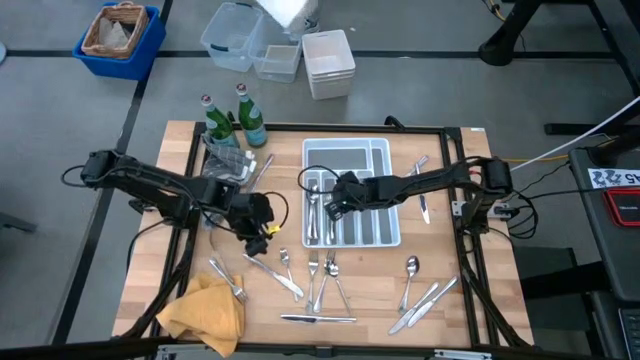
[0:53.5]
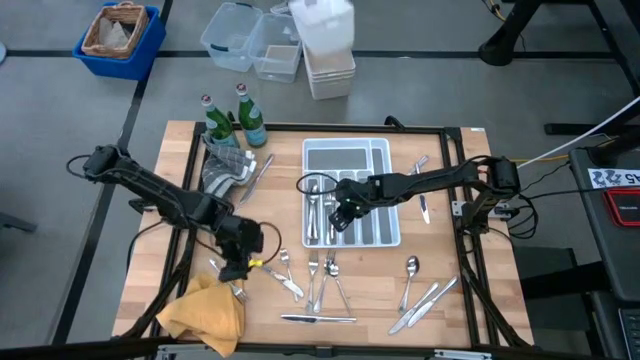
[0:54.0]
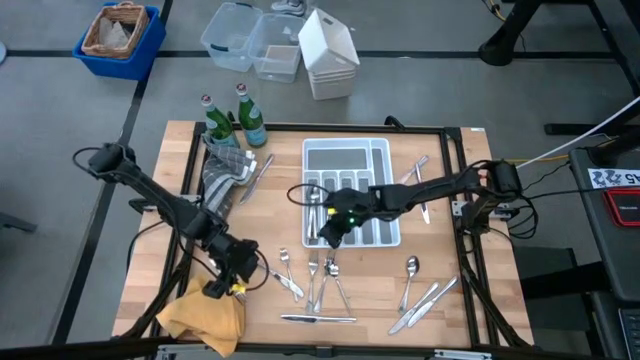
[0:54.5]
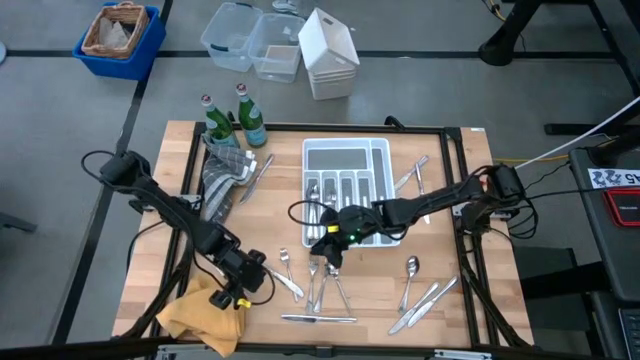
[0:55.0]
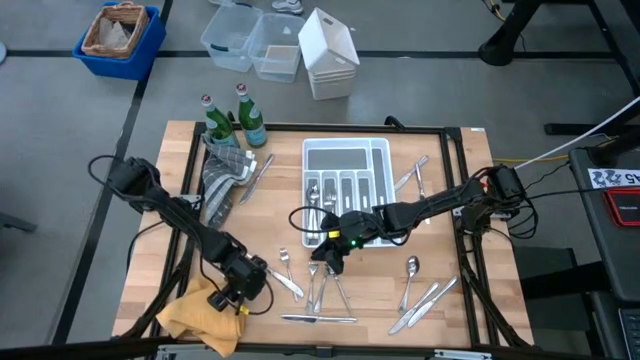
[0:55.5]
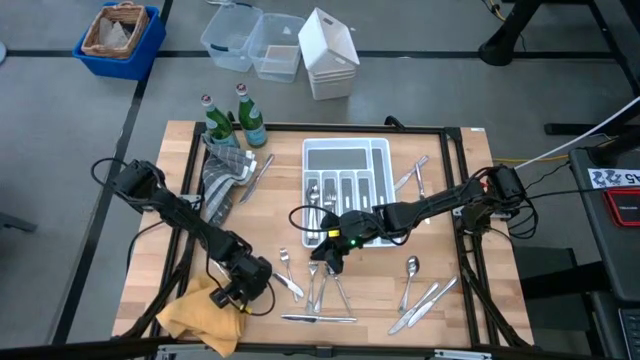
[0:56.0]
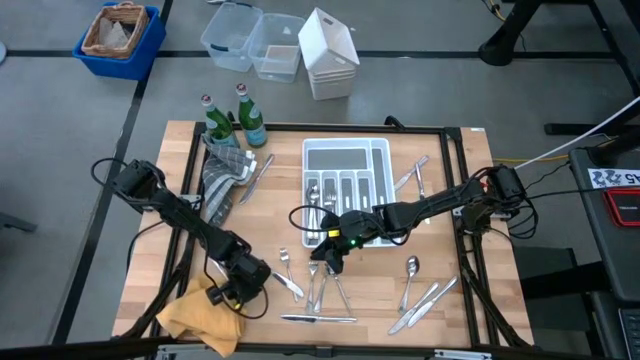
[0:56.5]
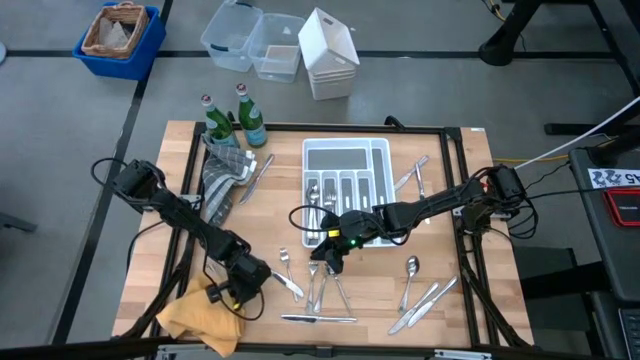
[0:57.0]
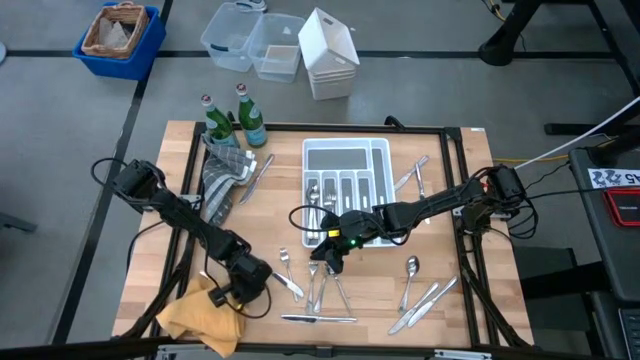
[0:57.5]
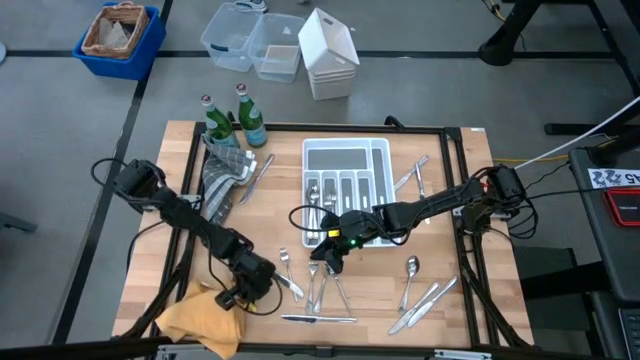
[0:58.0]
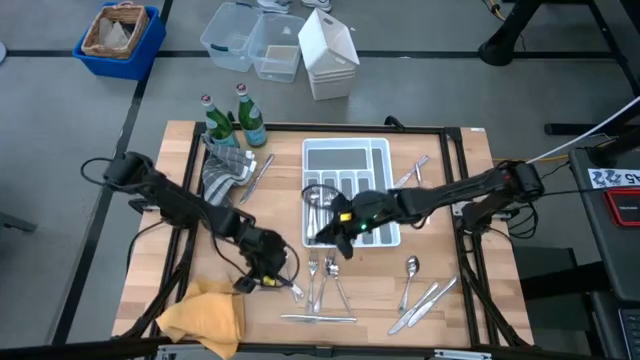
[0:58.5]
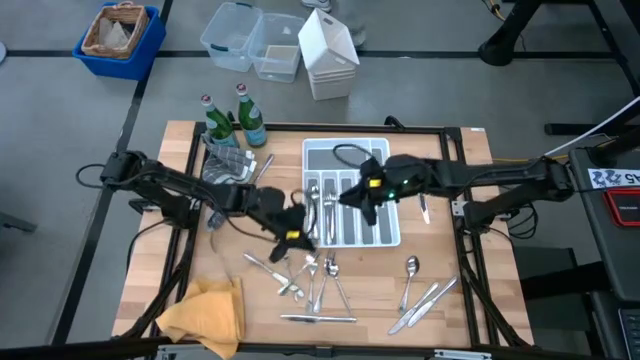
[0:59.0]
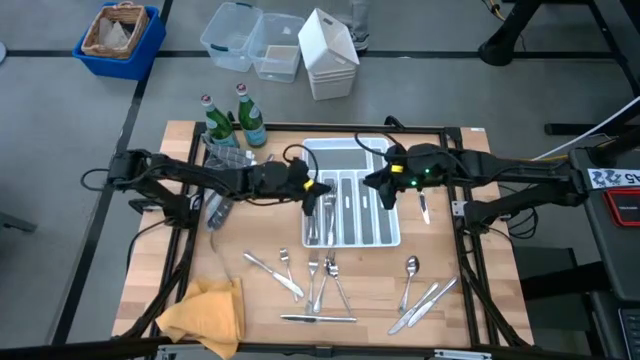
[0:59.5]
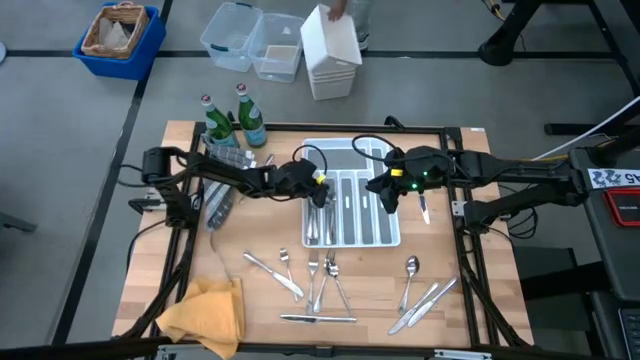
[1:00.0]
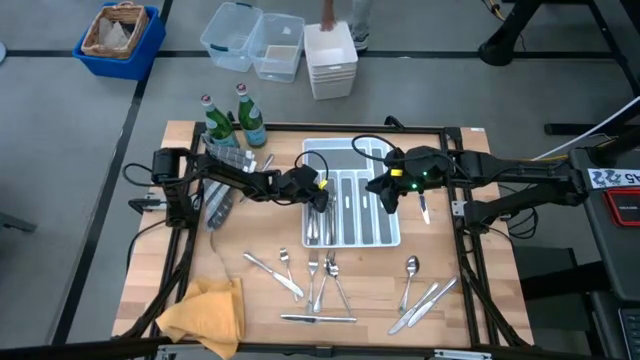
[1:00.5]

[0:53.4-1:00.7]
Task: Sort silverware
Put the silver fork into the silverware tray

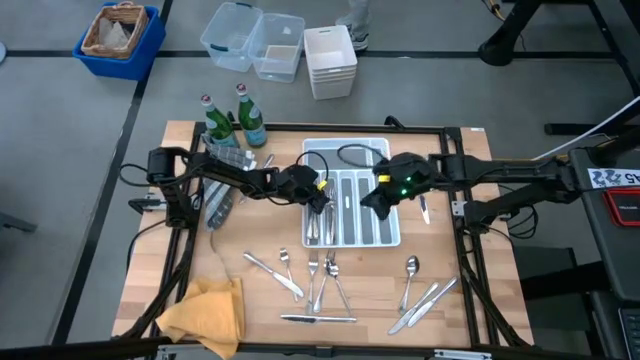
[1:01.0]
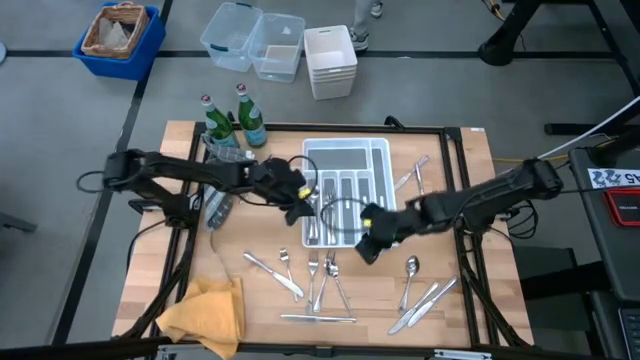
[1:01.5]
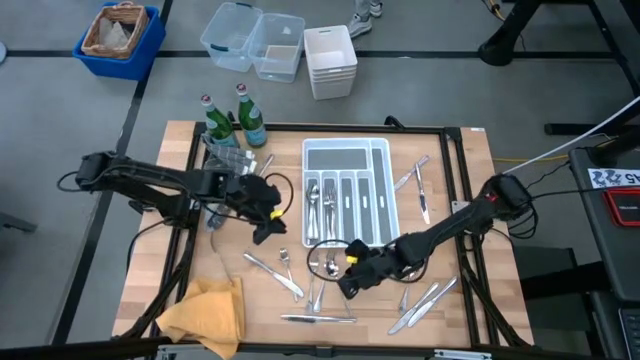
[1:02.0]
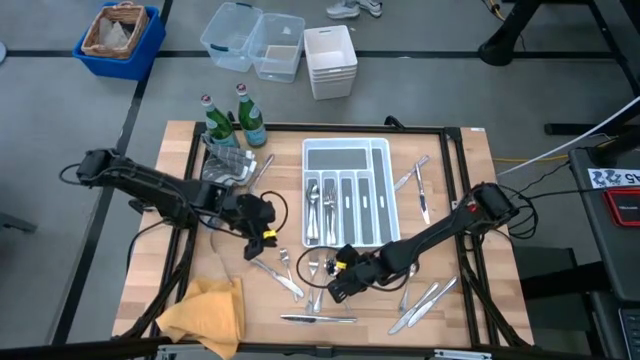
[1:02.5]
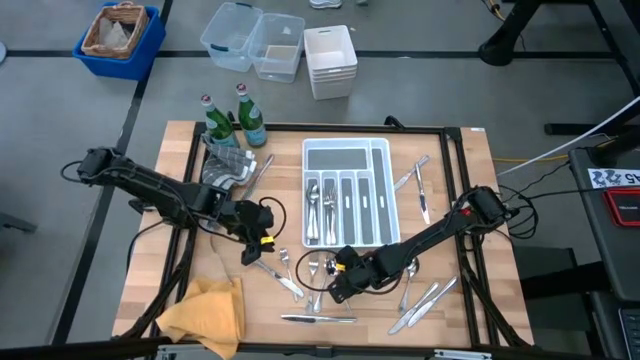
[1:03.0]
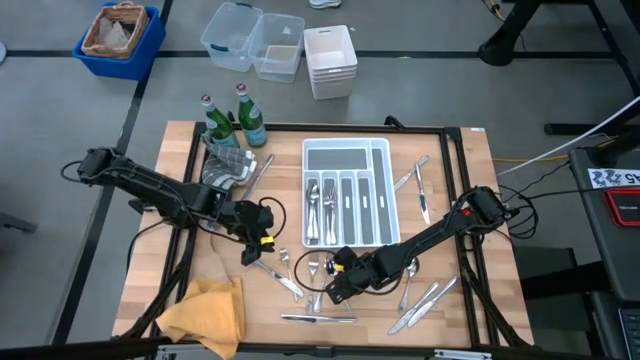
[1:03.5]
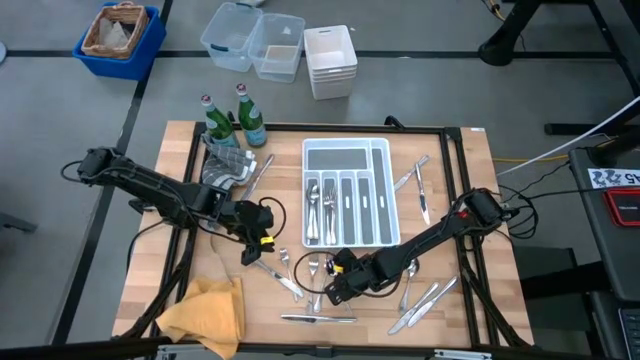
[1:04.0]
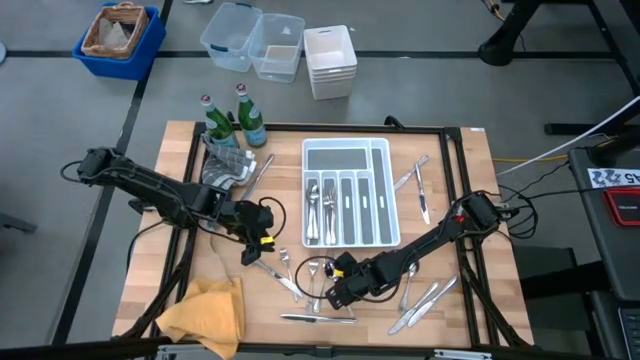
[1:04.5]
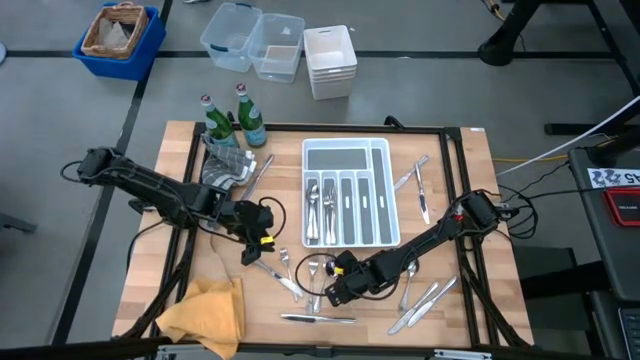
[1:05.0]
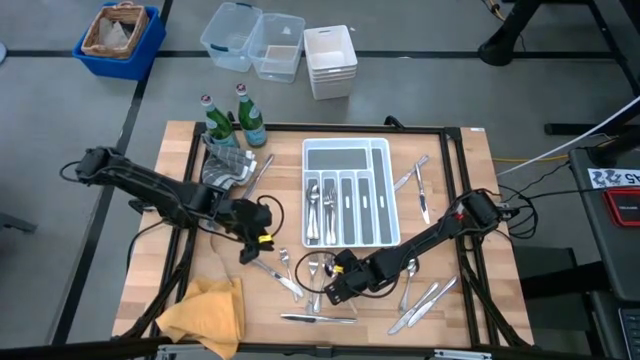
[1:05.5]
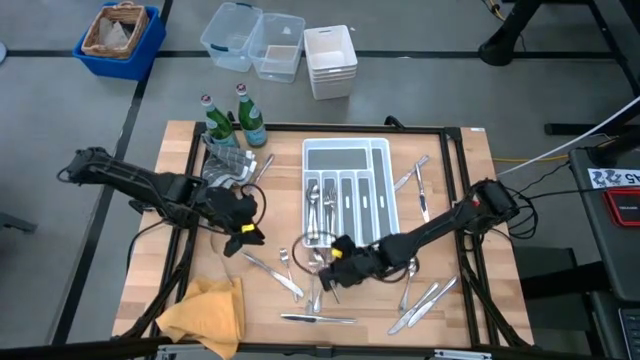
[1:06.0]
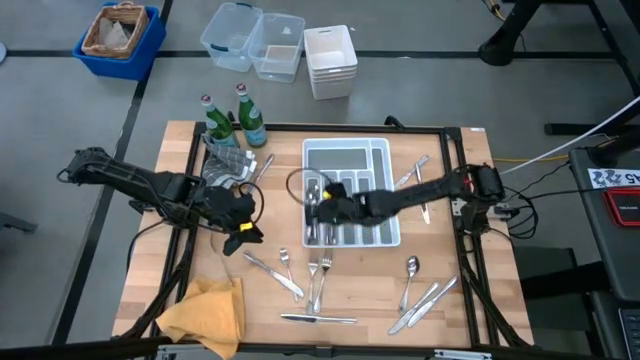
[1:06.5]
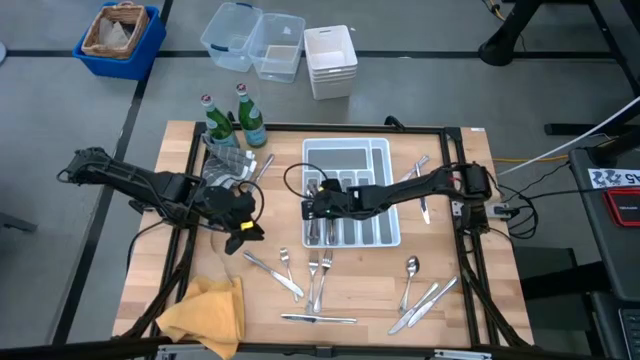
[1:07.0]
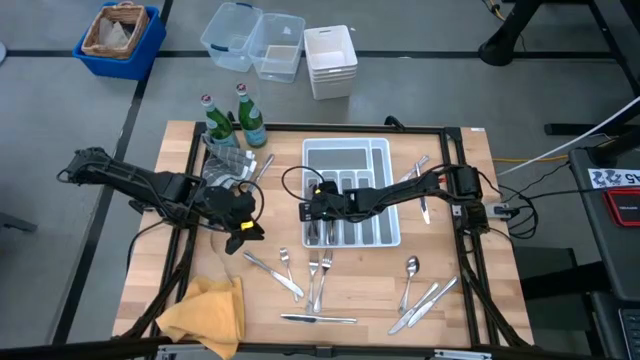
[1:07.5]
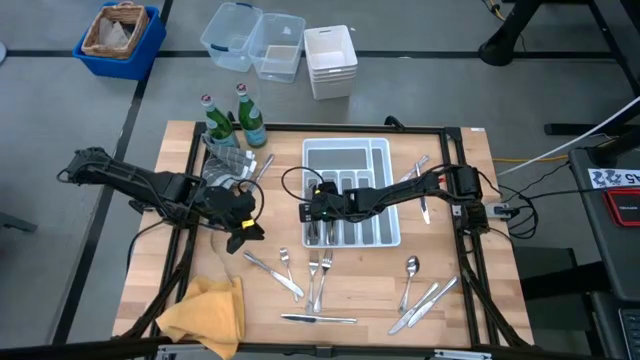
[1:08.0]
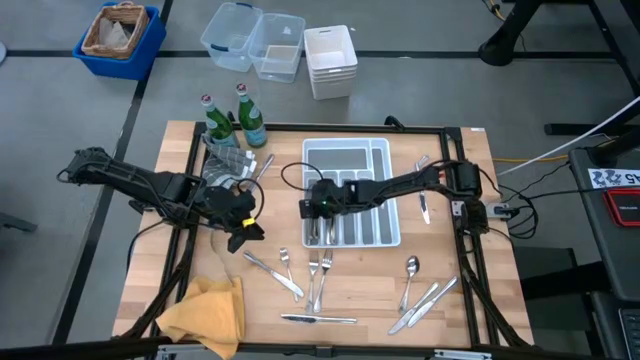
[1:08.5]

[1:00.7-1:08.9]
Put the silver spoon into the silverware tray

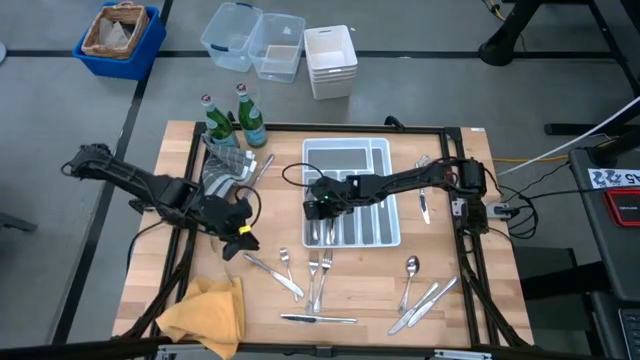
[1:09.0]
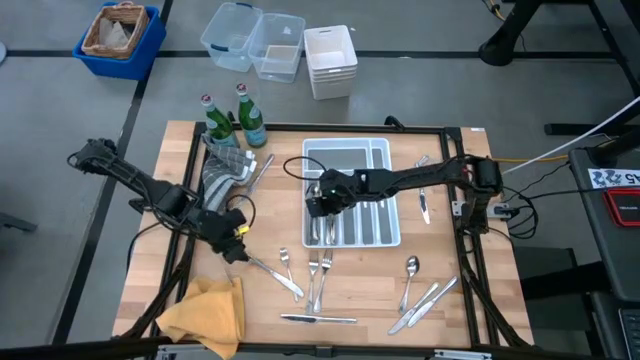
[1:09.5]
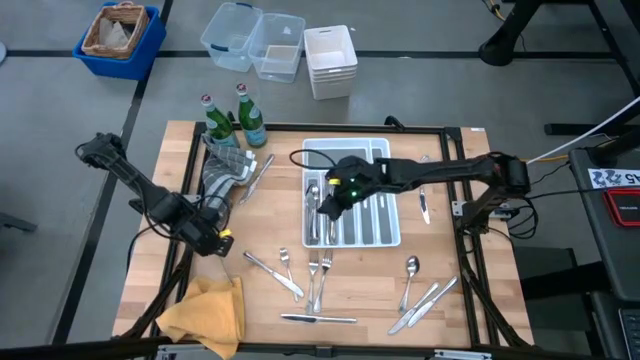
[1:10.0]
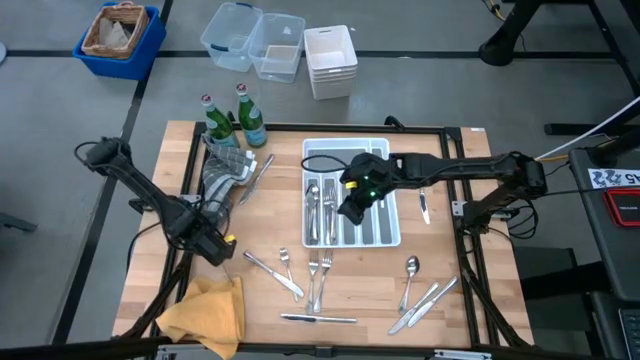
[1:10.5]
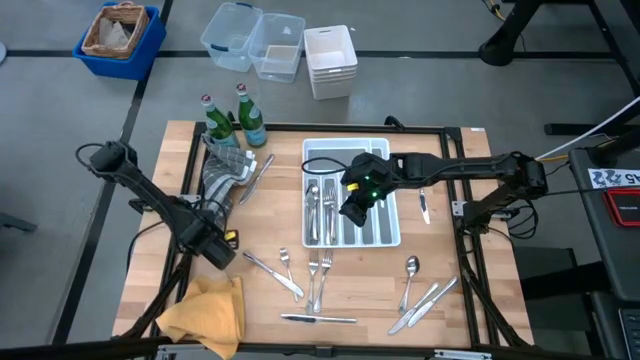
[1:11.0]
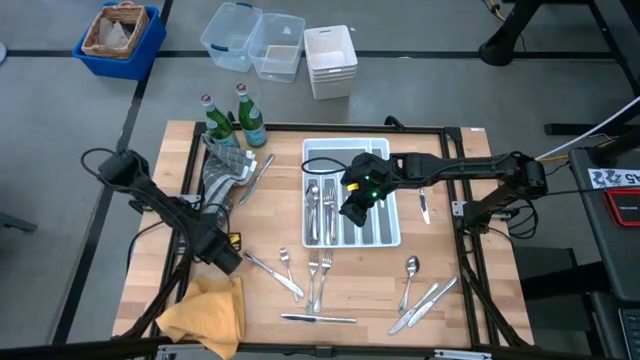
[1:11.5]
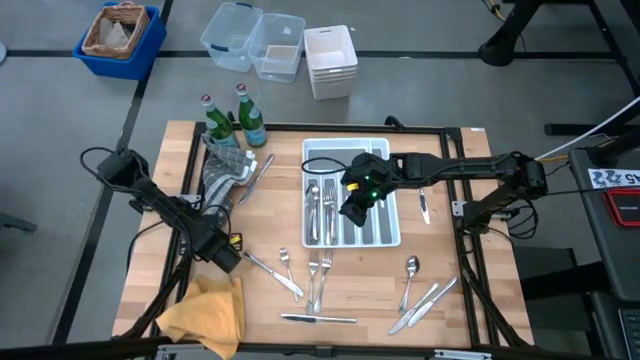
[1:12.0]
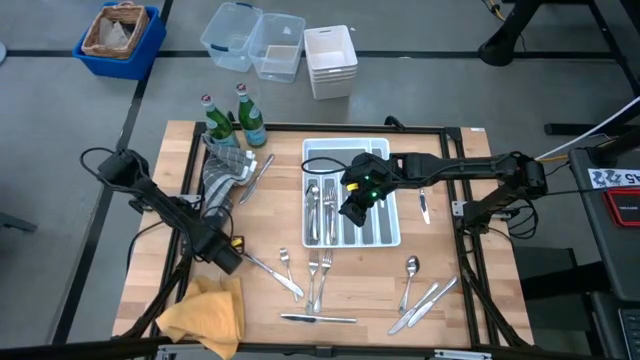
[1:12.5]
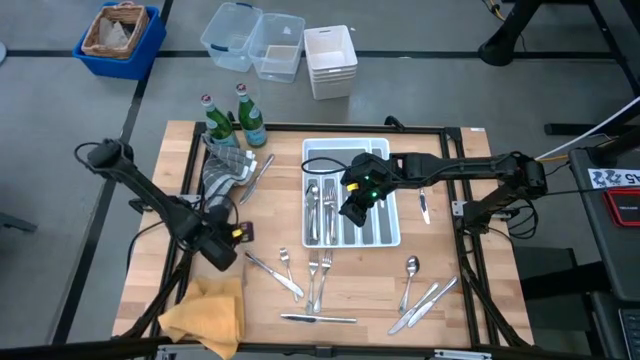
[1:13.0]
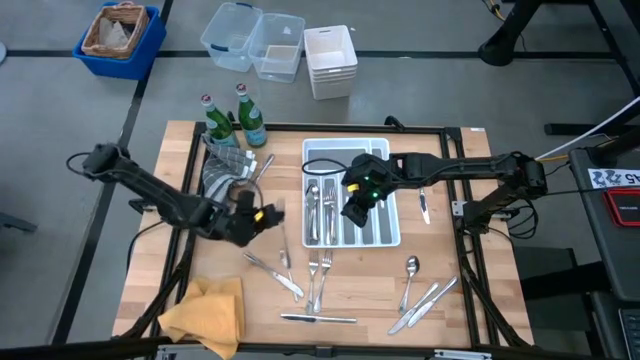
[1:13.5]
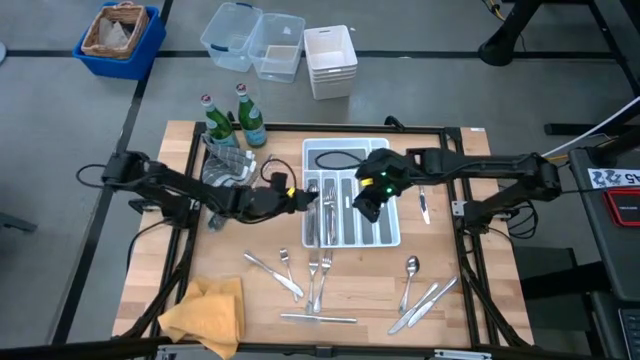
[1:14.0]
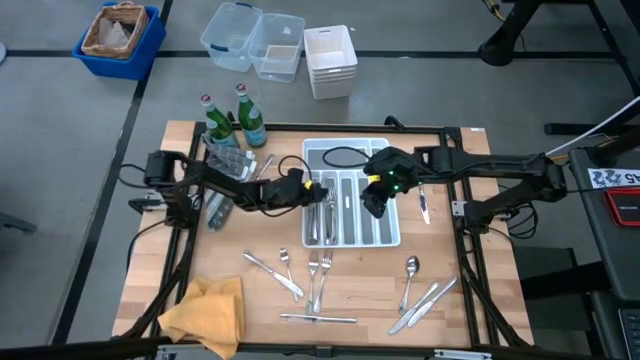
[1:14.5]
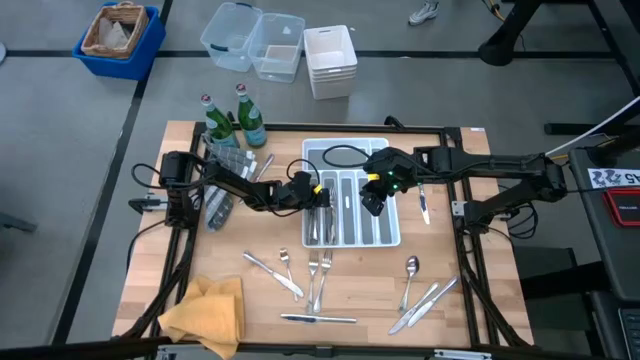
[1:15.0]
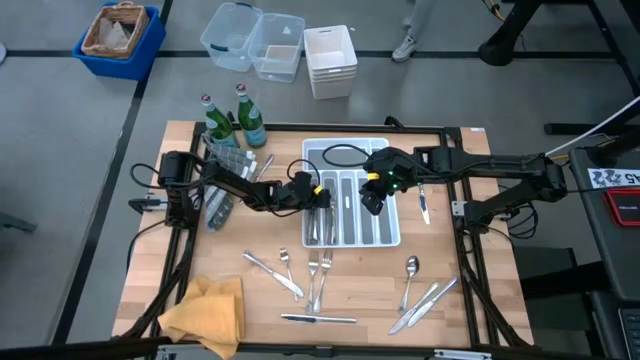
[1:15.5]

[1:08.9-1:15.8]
Put the silver fork into the silverware tray
